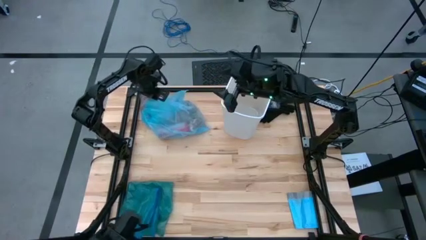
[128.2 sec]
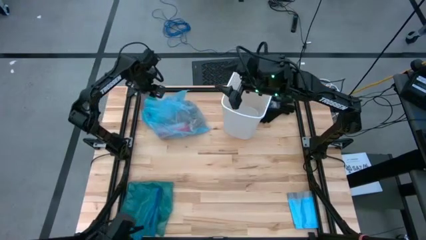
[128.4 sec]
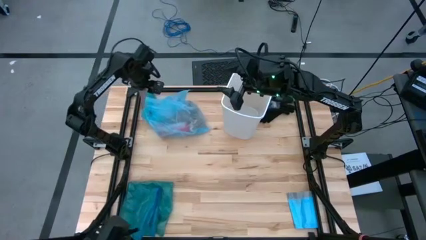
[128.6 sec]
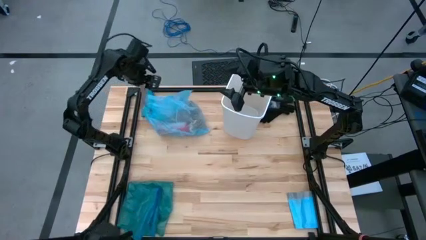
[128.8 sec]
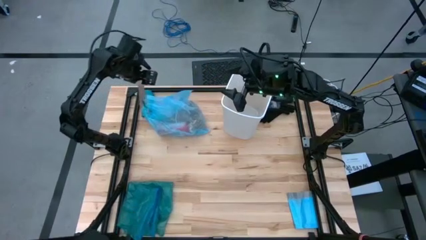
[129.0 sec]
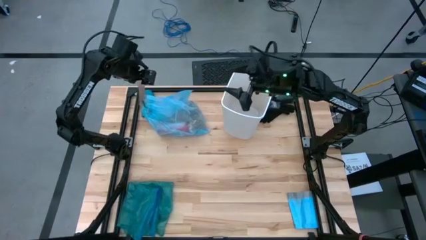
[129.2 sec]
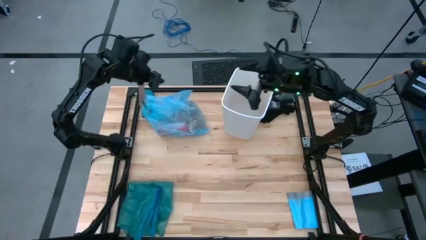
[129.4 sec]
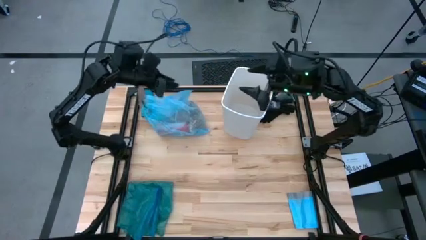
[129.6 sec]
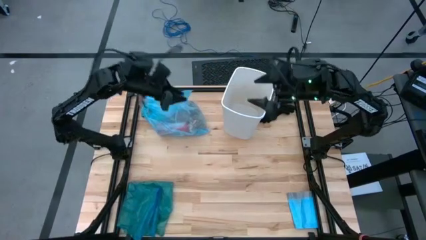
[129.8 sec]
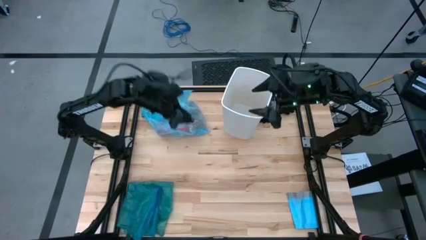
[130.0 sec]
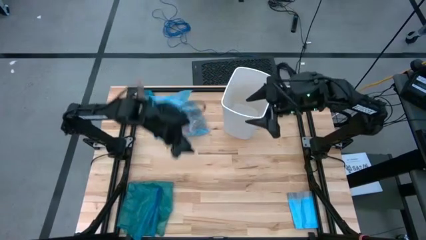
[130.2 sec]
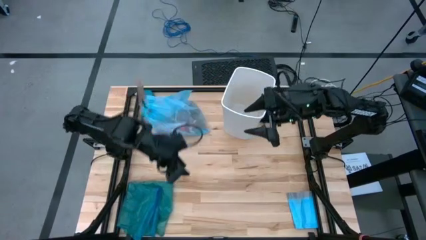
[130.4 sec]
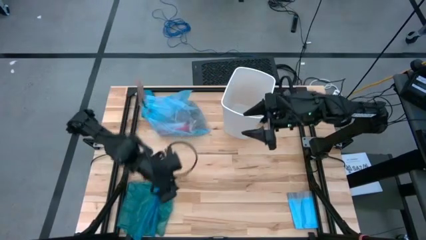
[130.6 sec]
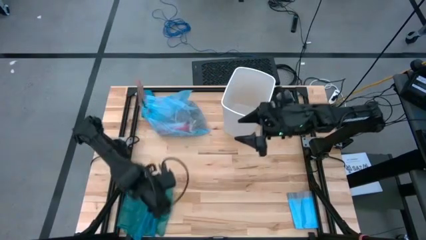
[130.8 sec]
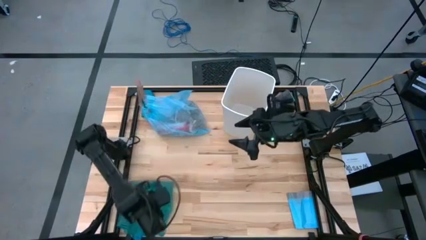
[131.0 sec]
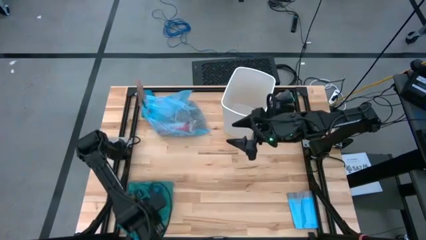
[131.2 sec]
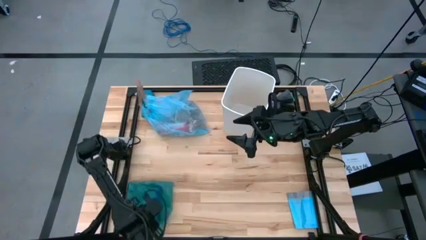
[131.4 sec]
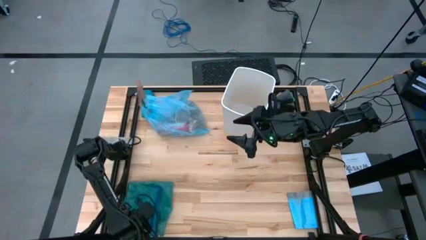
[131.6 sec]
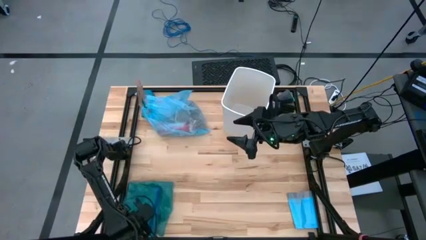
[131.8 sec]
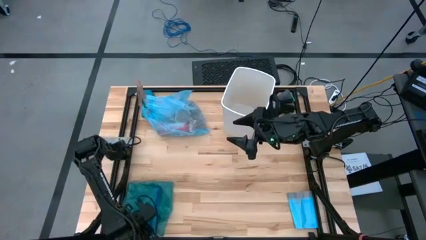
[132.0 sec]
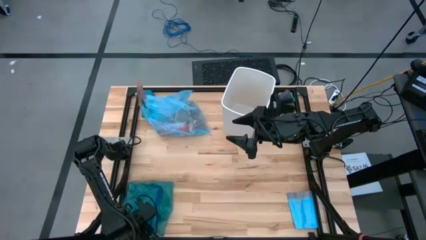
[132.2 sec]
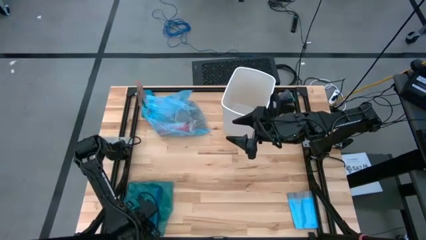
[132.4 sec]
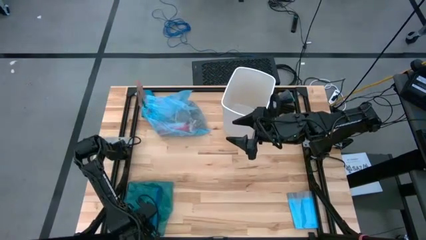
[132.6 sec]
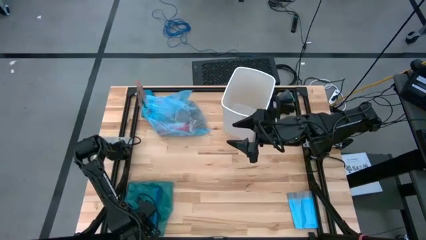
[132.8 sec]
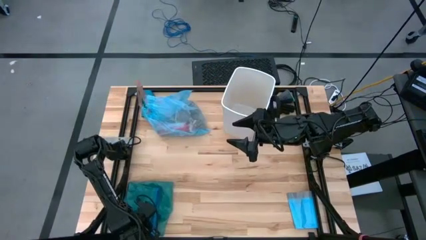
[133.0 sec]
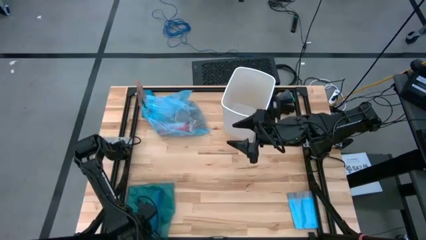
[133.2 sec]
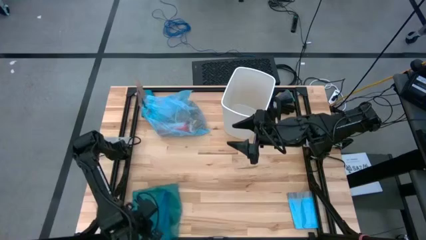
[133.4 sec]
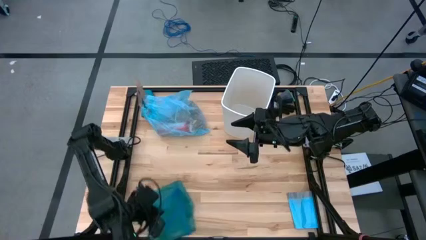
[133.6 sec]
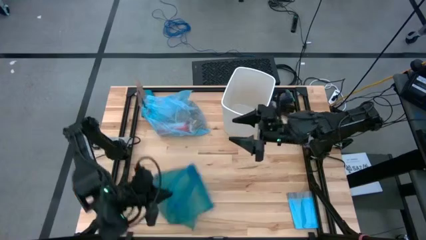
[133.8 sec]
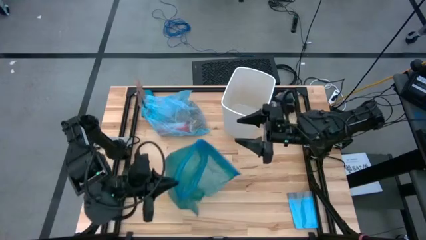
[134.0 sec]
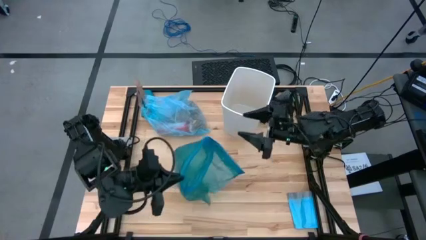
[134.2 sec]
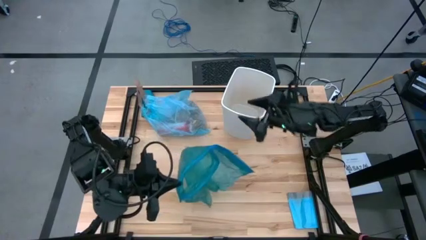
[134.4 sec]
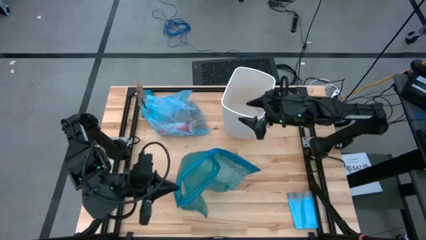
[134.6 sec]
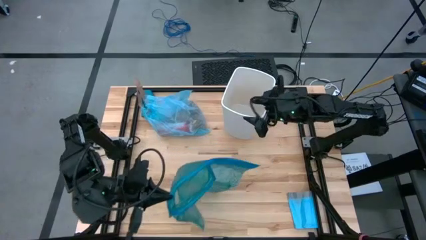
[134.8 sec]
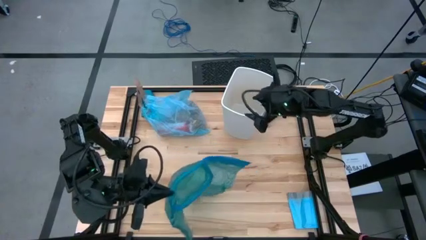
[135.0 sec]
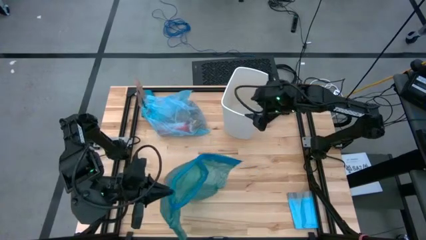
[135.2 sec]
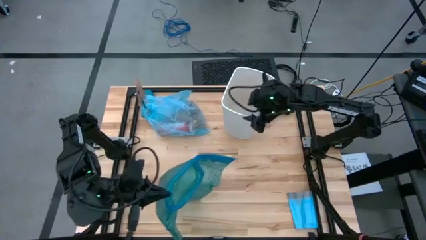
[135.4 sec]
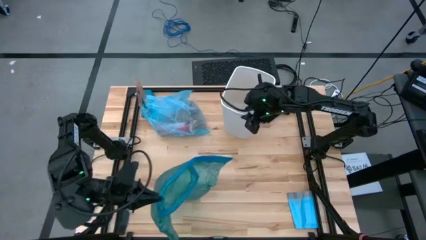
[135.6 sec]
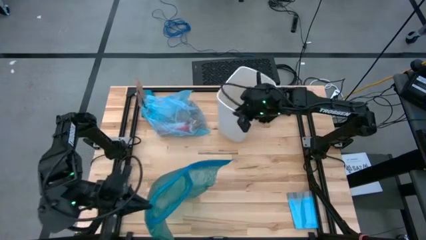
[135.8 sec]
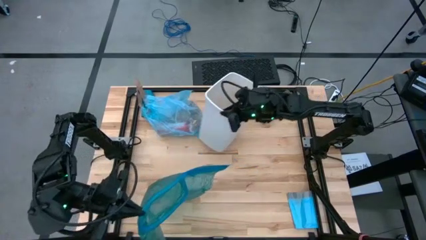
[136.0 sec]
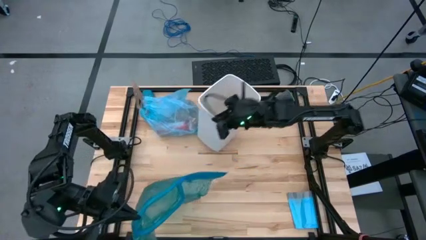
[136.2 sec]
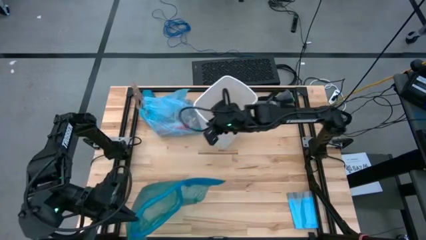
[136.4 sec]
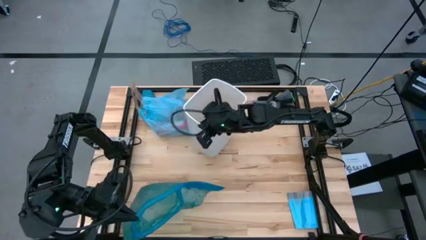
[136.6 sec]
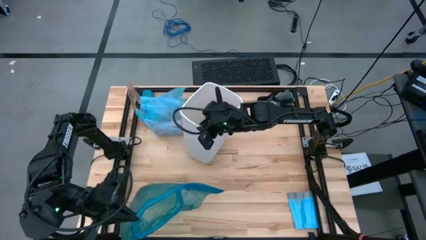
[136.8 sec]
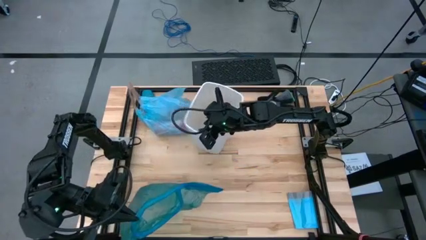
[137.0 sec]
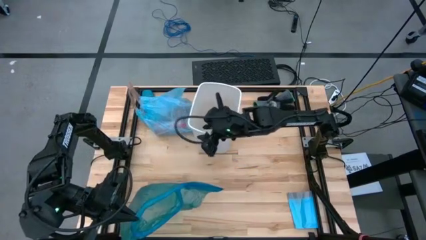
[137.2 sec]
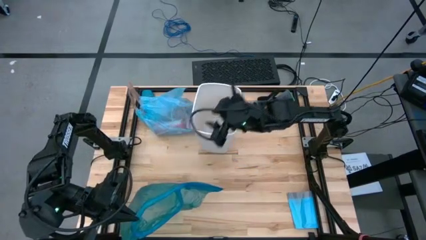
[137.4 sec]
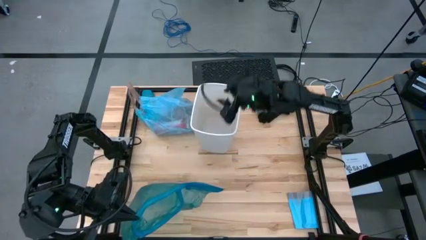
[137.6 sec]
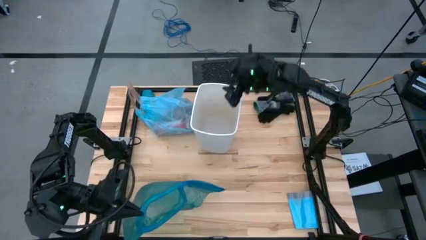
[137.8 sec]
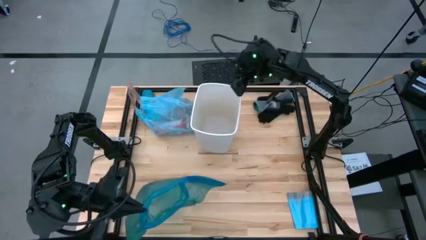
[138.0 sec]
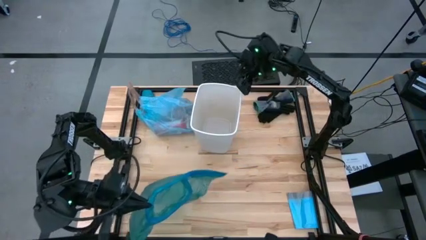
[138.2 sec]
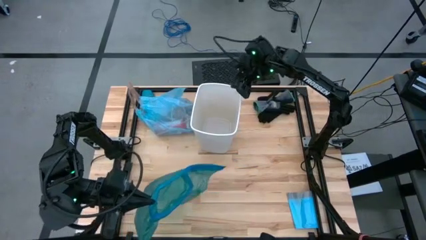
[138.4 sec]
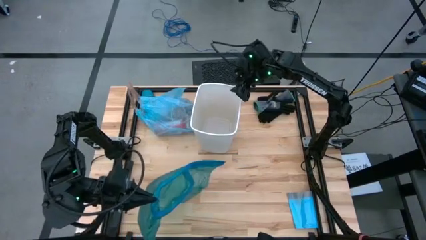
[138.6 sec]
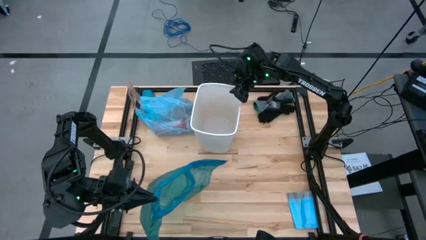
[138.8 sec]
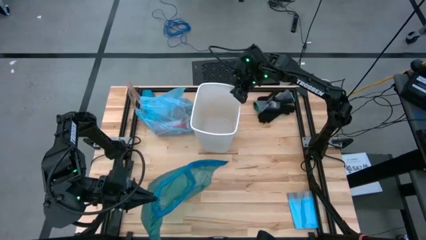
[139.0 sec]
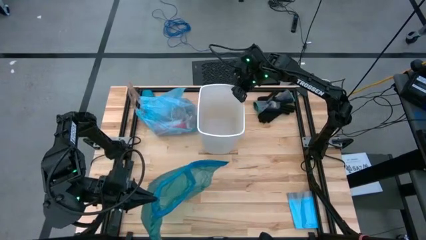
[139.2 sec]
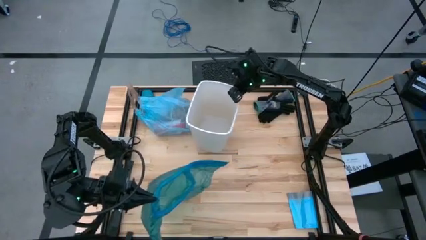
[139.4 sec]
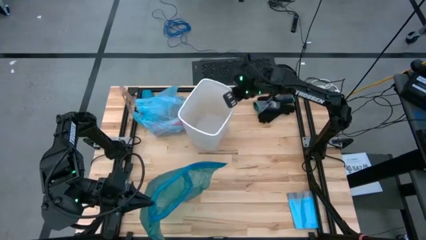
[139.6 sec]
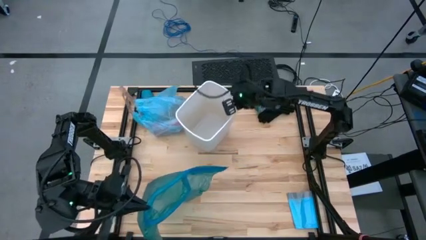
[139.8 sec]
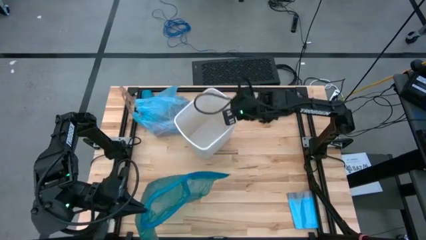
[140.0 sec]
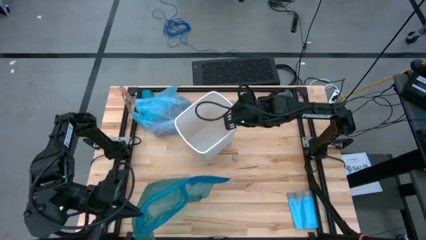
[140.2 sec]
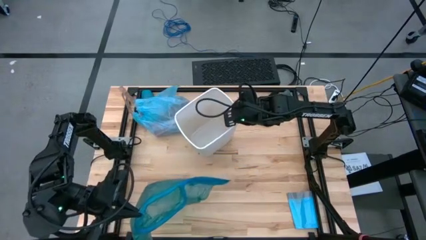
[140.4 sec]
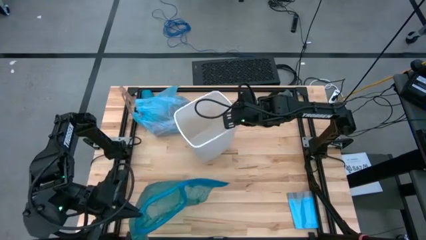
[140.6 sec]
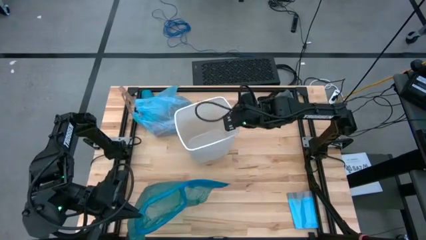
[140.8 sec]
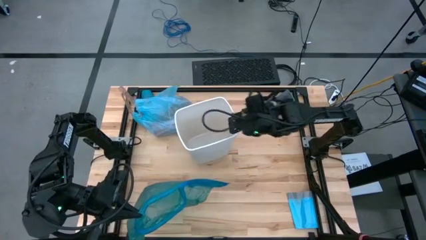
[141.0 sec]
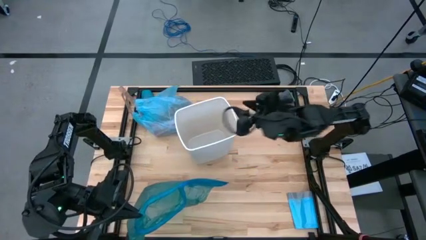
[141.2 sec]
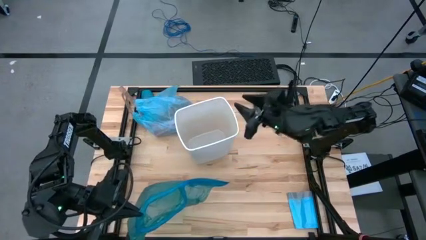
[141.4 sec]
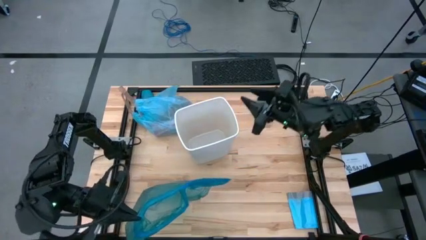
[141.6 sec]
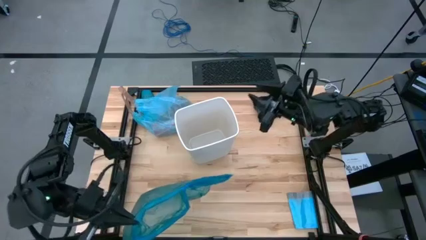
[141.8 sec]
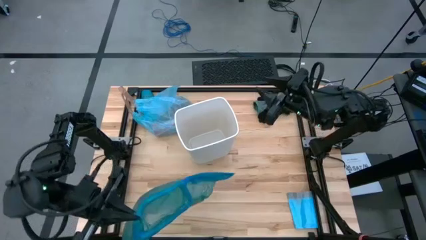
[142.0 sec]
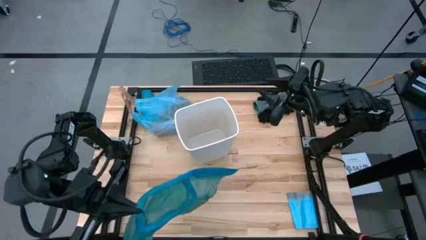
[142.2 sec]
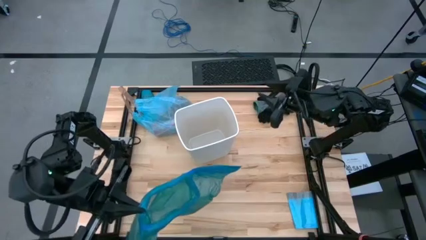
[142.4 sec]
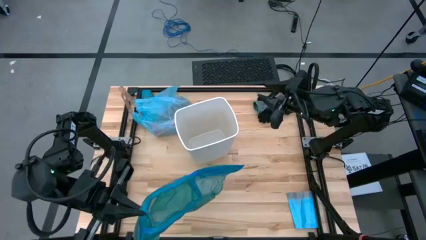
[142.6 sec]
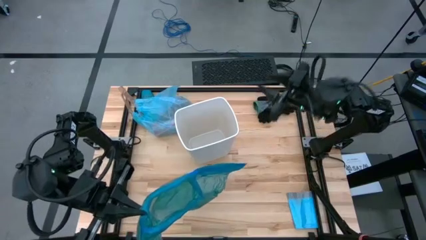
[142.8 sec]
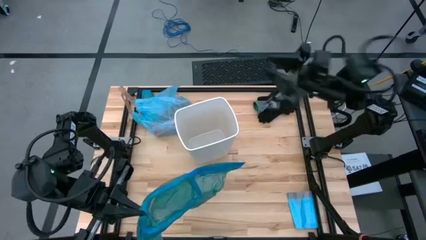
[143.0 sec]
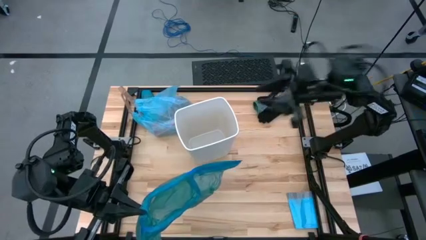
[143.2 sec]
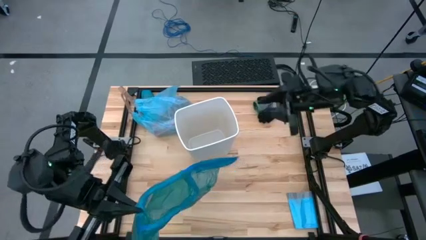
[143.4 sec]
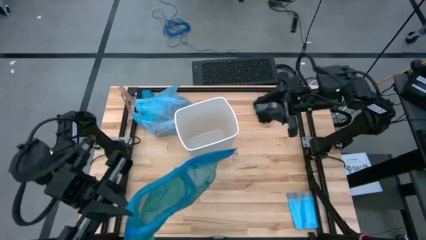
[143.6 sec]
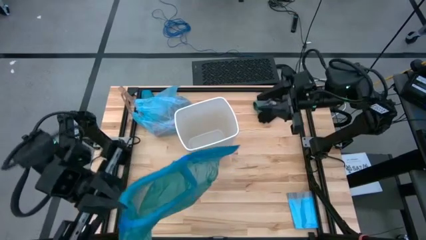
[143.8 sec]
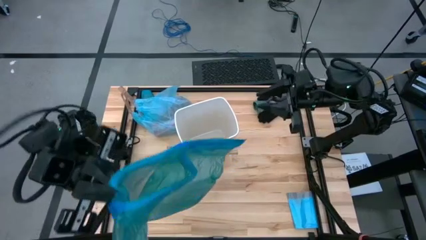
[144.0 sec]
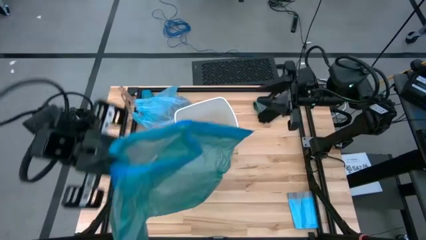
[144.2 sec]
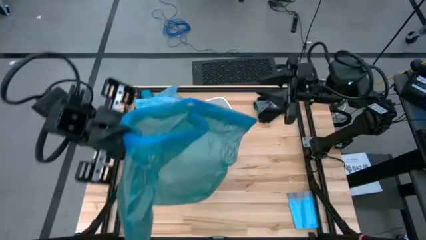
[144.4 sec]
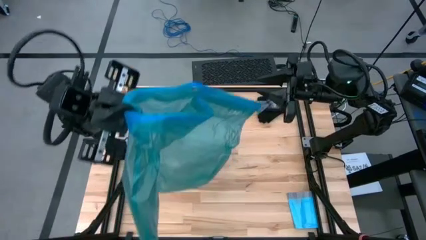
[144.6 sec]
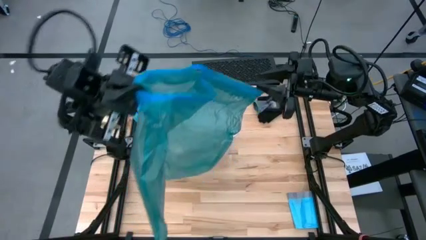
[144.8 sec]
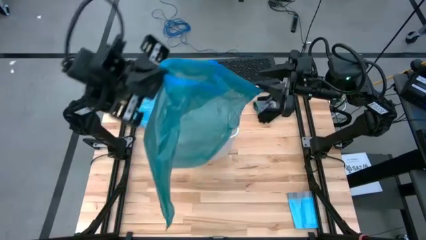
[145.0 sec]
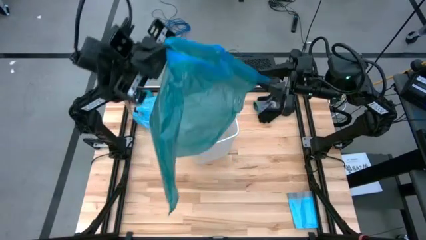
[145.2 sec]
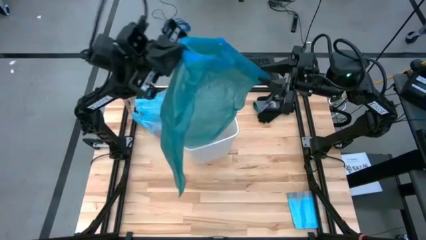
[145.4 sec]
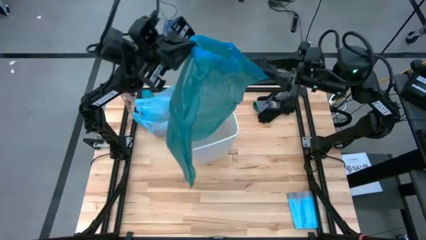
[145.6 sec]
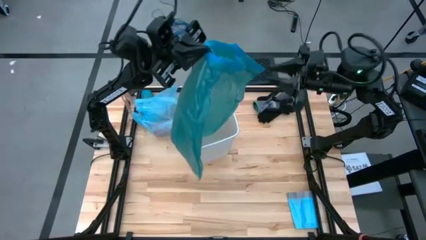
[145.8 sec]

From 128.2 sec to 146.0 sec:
Task: place trash/remove bag and relplace
Insert the blue trash bag into the white trash bin
